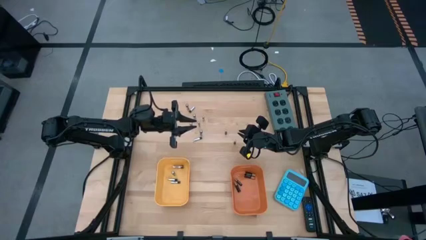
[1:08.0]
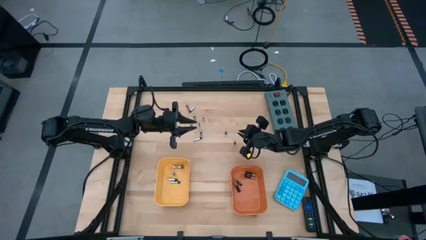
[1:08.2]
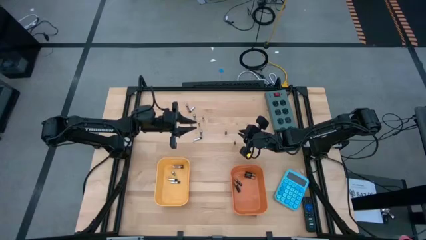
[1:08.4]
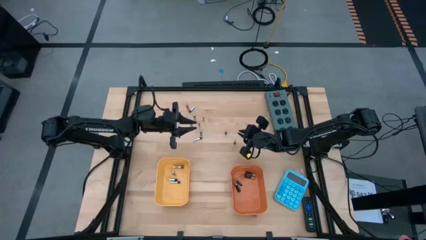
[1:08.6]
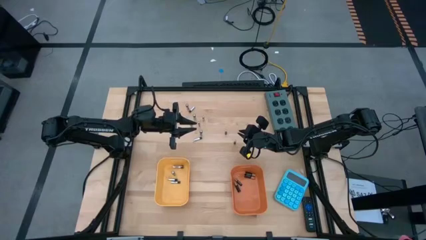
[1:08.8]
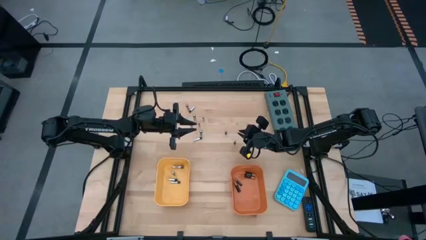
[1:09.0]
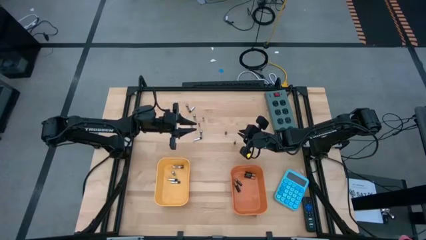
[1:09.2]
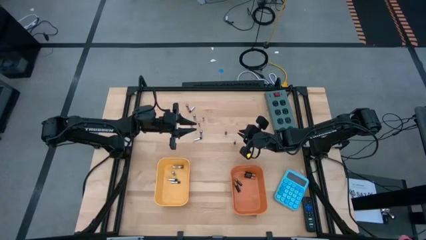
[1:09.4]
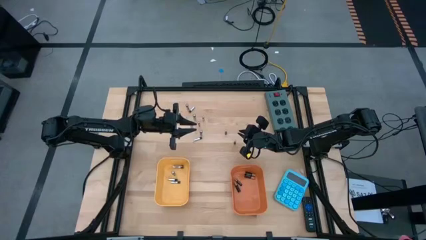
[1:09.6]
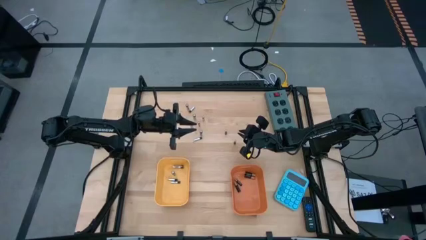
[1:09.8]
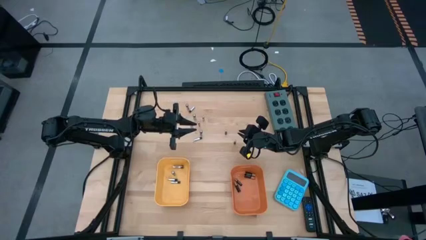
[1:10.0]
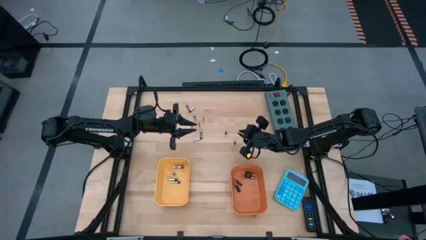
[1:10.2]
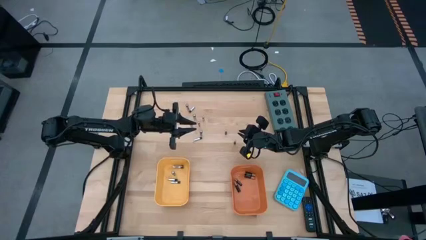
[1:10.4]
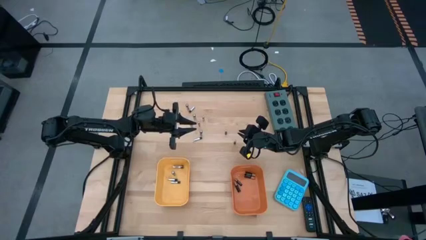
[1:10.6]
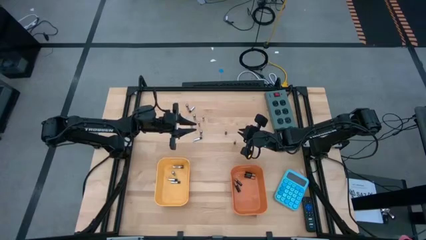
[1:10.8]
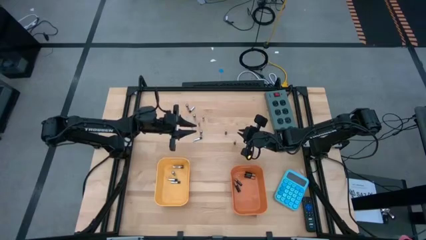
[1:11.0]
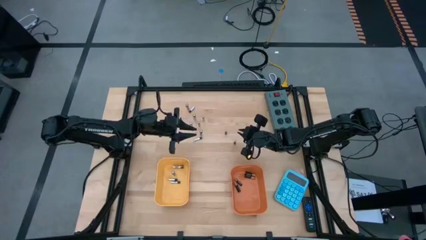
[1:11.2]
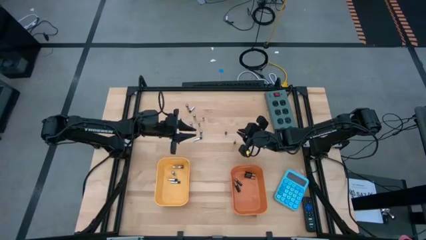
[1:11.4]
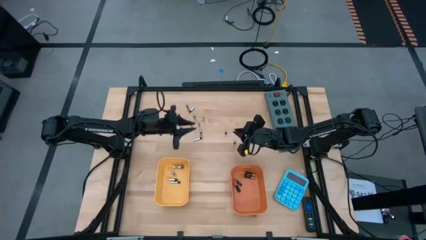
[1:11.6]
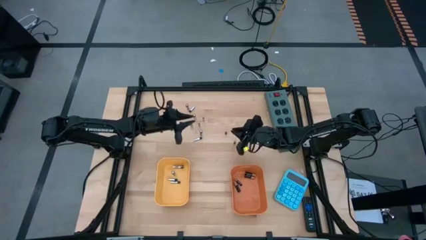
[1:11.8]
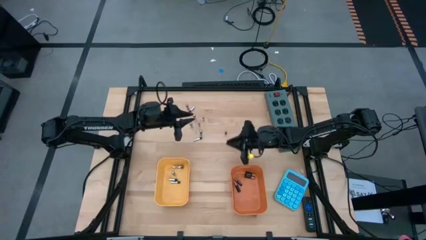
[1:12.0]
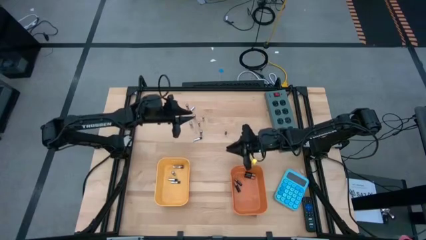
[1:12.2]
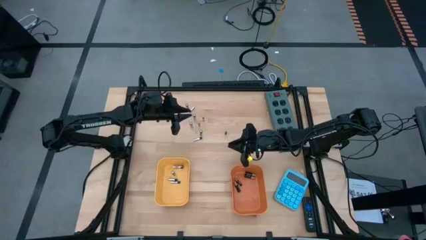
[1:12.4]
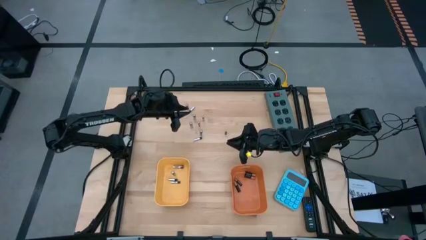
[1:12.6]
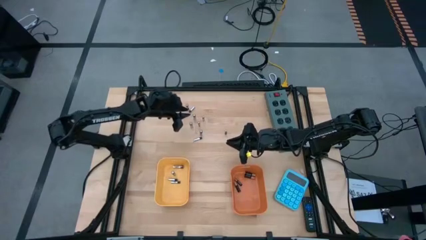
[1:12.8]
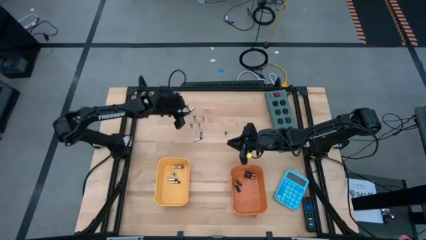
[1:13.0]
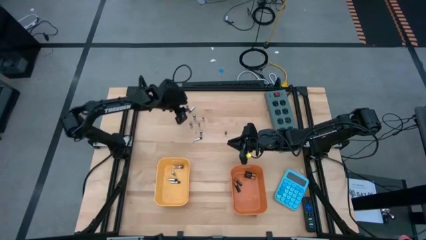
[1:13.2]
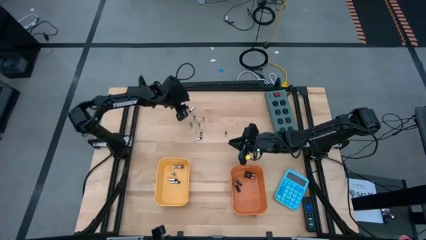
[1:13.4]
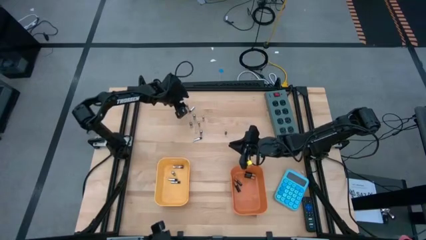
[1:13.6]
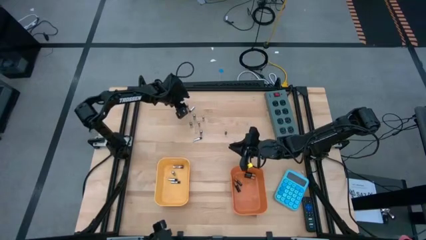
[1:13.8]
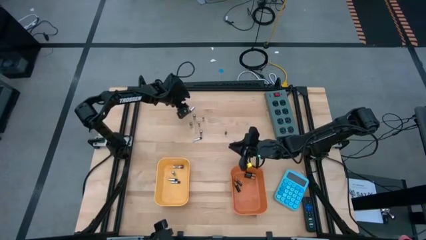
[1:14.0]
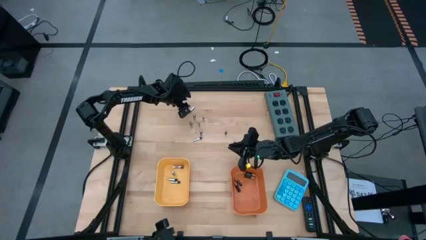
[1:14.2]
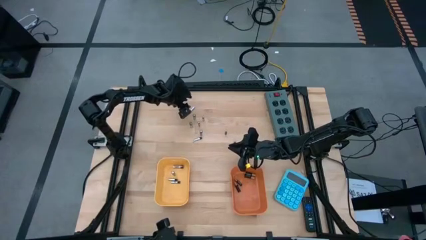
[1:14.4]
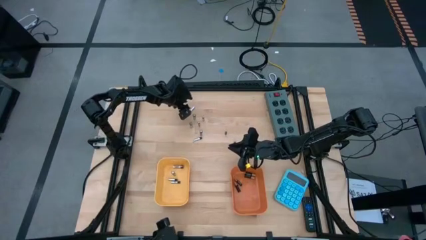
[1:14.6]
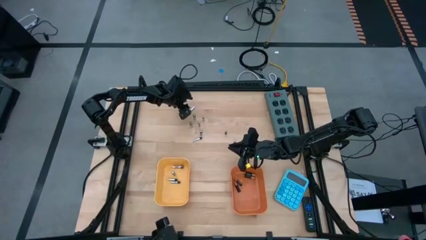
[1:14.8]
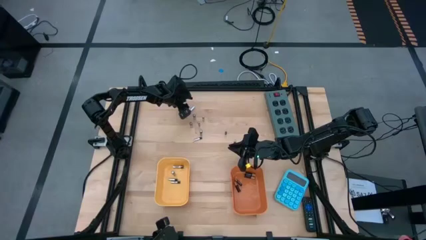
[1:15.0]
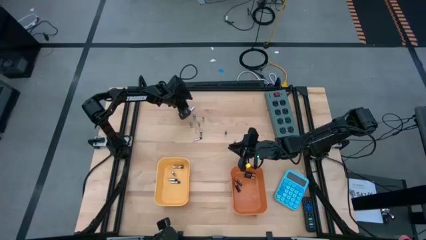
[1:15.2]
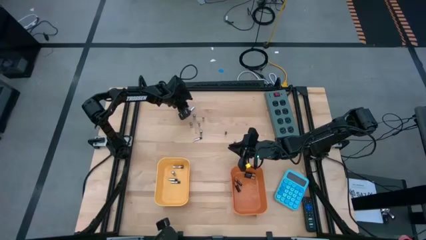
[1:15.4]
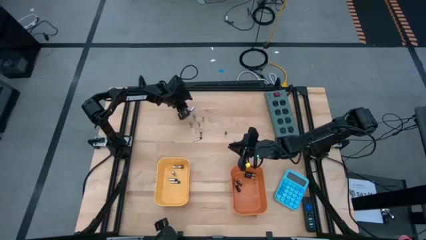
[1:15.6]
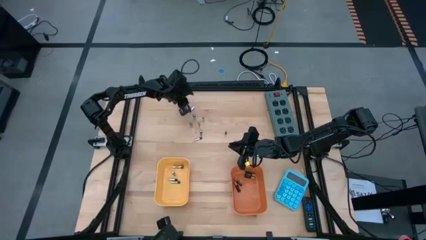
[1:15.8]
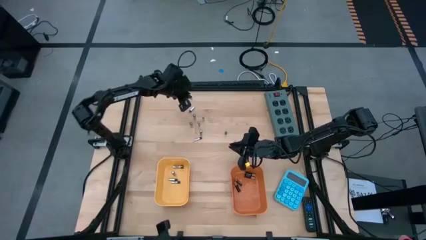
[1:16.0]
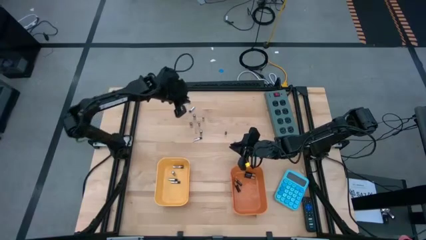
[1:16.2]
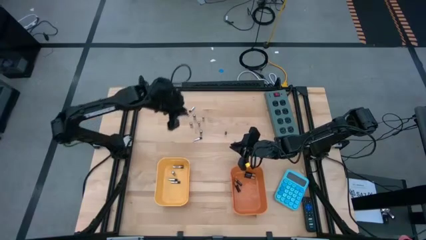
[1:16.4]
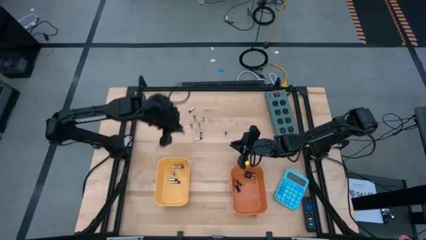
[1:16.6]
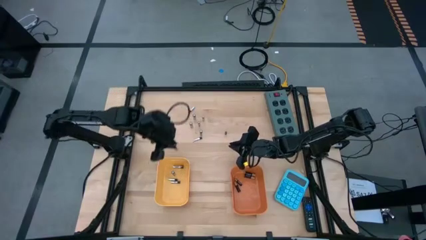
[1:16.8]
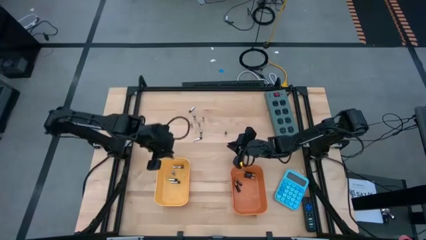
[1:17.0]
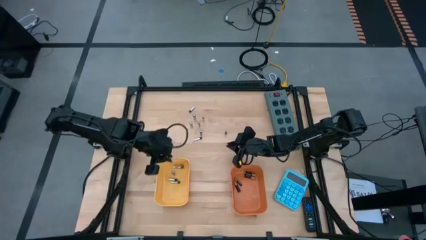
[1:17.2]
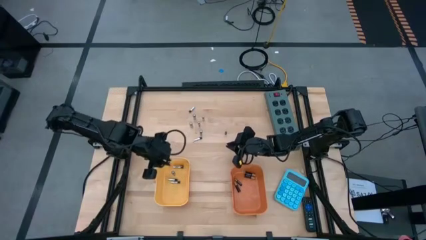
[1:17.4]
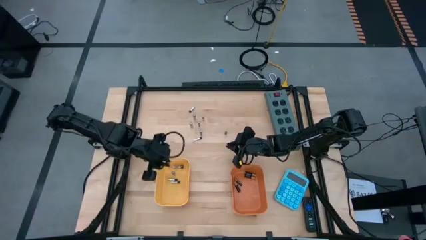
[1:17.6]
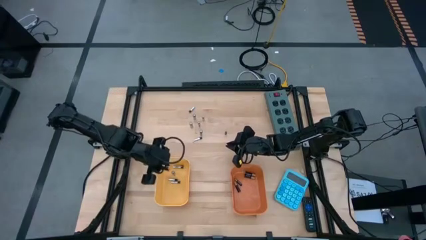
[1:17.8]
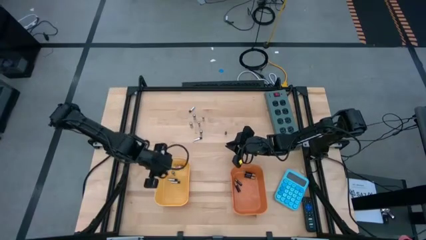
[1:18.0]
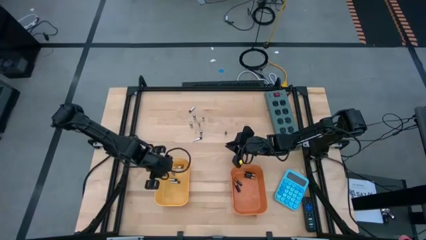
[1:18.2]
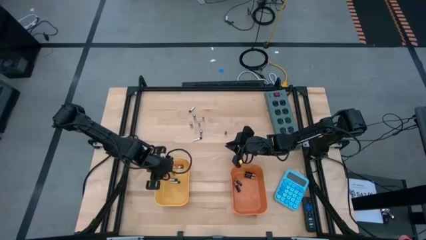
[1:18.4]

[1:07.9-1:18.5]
Task: Sort batteries
Put the silver battery into the yellow bin

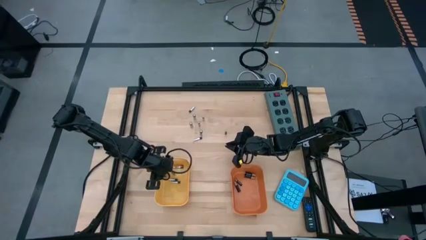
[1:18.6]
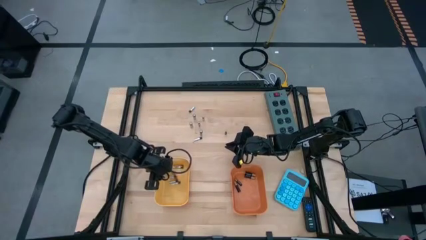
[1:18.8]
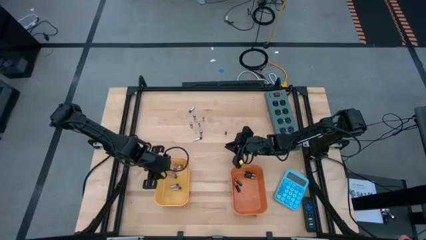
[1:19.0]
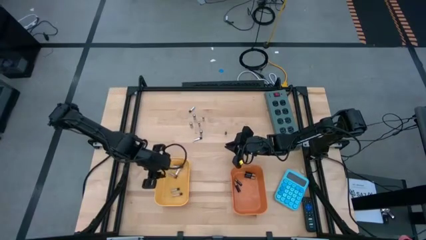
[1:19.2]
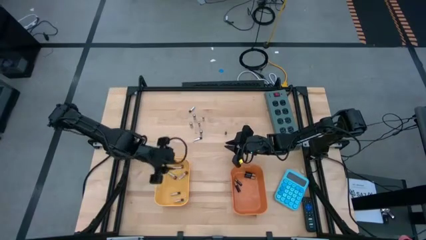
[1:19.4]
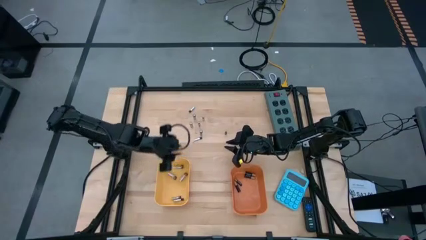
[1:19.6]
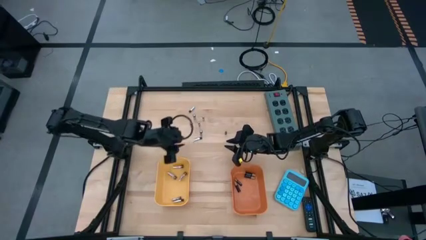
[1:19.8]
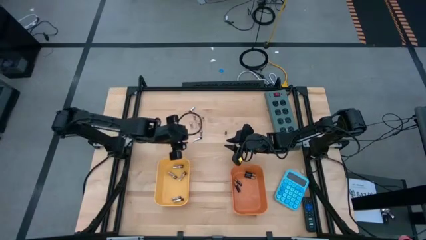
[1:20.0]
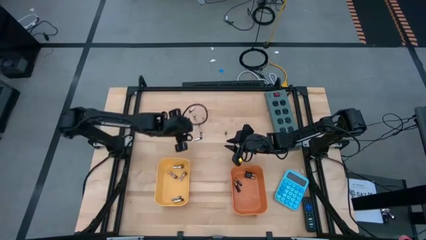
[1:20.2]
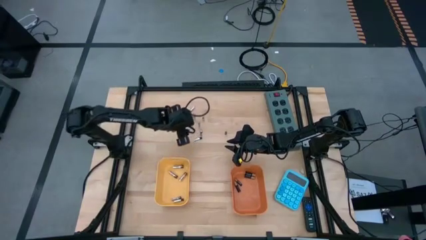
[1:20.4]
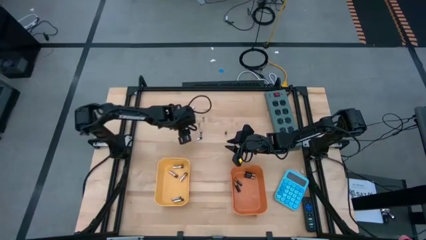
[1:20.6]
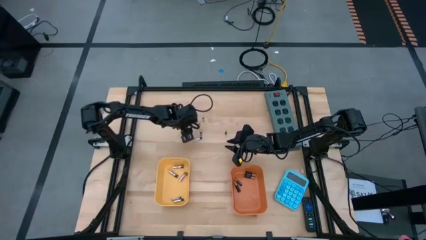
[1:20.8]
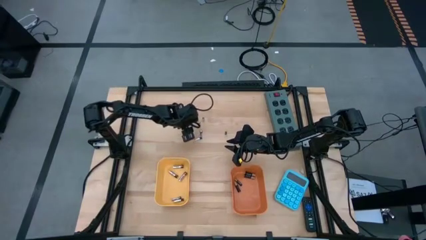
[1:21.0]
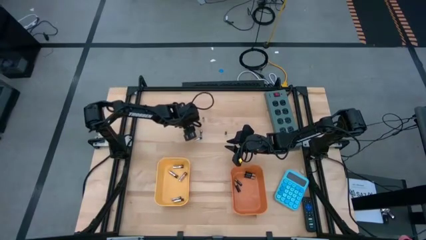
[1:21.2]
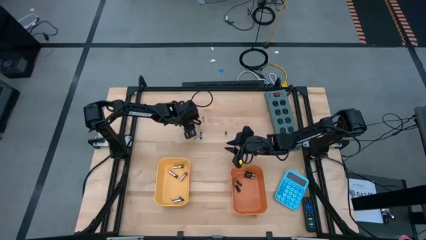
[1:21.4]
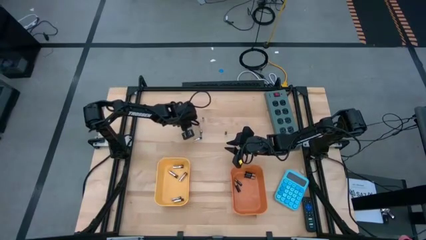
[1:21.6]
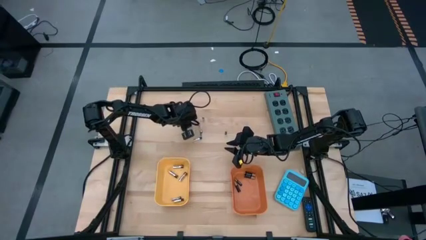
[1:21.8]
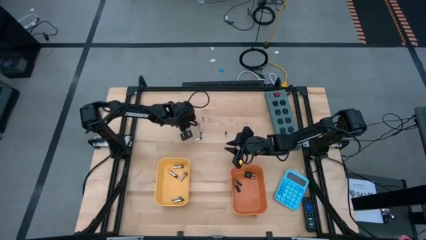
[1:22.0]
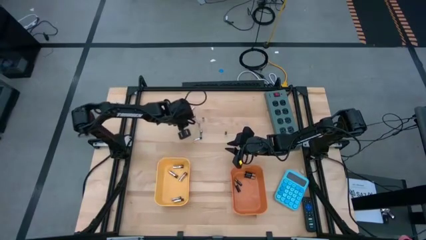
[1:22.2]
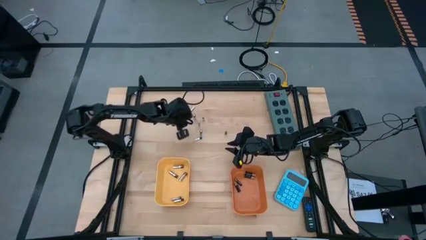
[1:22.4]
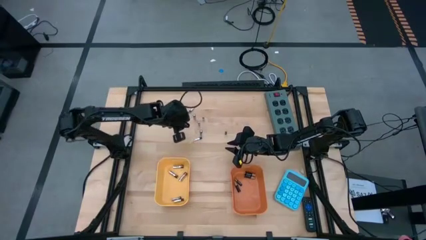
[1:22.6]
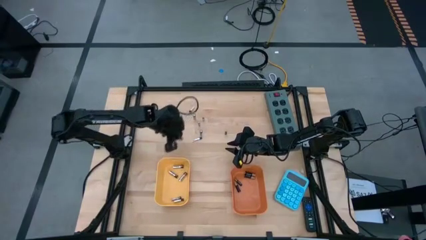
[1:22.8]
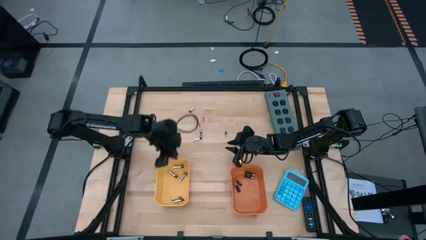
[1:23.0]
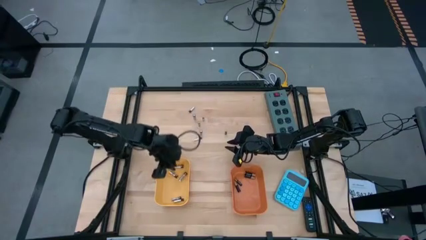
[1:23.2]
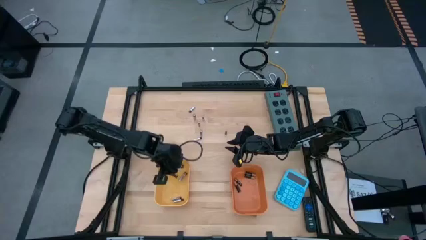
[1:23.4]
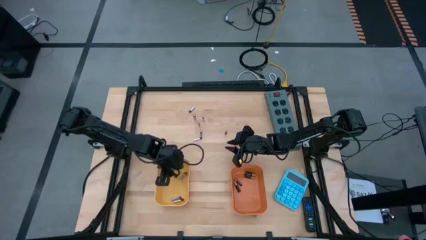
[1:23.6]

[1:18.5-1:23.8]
Put the silver battery into the yellow bin

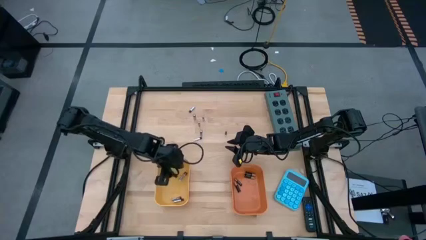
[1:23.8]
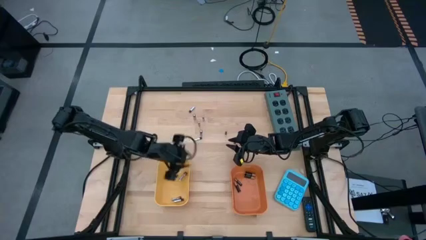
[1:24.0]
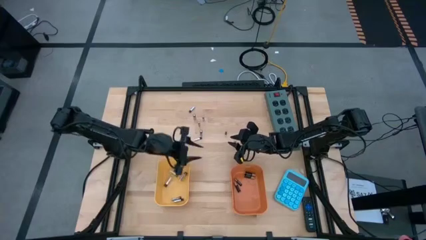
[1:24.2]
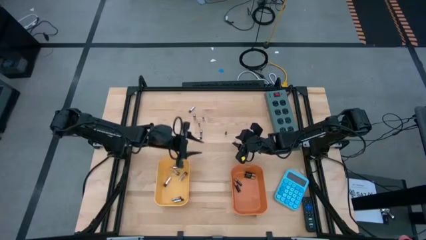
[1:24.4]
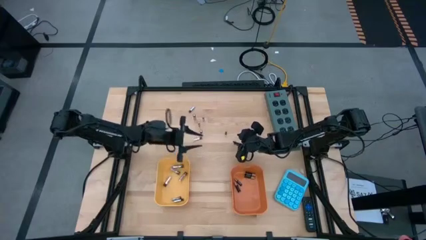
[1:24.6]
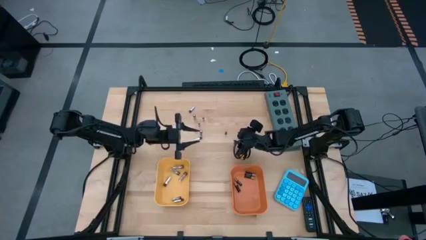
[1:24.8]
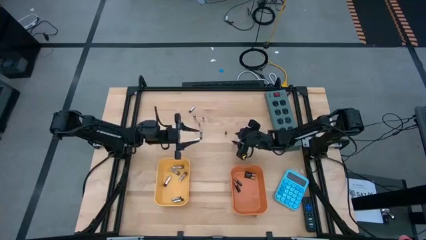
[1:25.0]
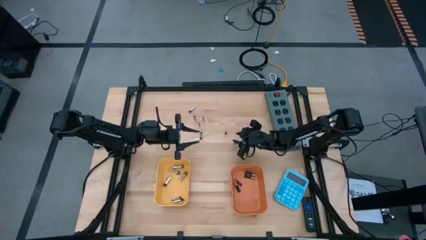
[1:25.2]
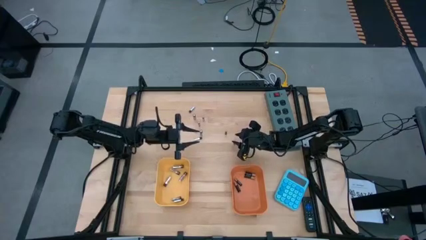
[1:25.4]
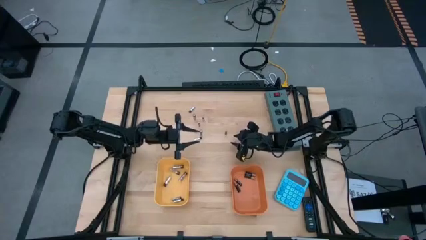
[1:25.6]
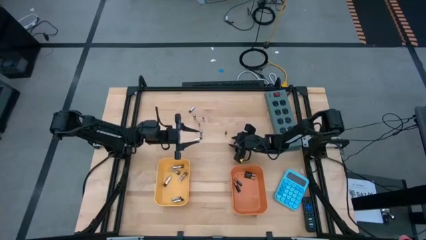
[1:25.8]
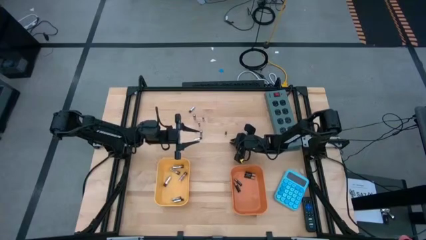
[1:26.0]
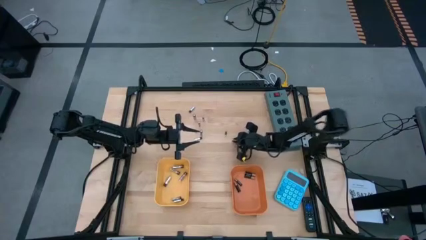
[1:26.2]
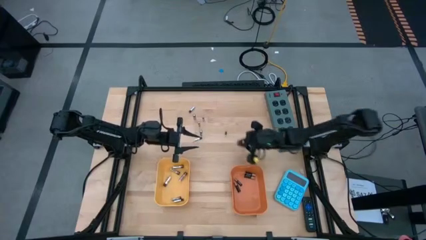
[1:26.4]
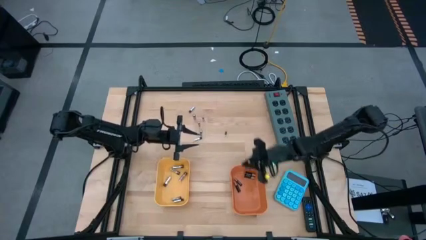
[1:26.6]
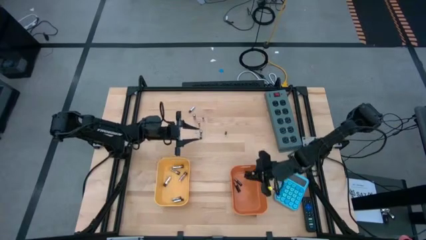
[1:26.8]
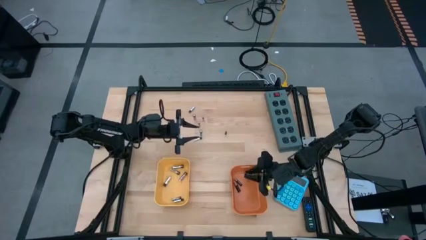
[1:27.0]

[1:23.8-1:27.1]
Put the black battery into the orange bin
